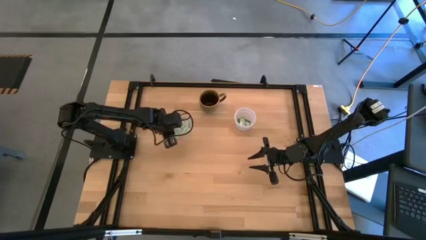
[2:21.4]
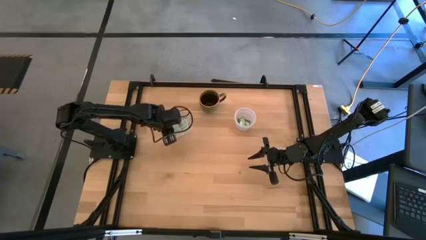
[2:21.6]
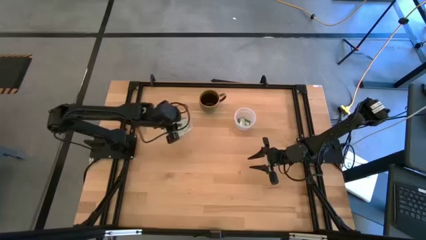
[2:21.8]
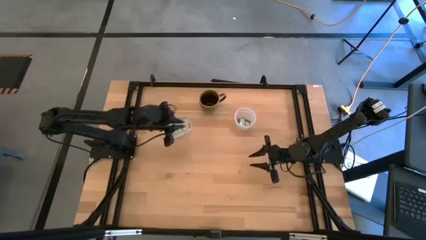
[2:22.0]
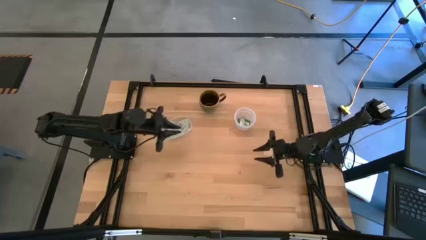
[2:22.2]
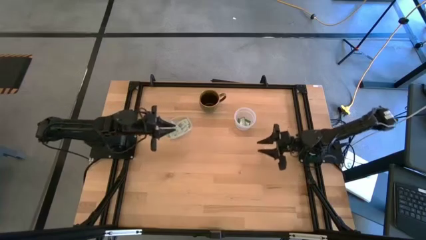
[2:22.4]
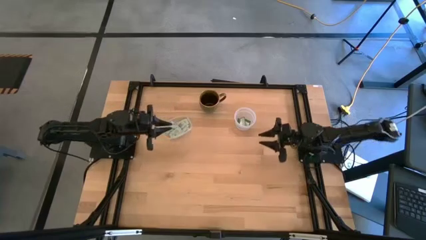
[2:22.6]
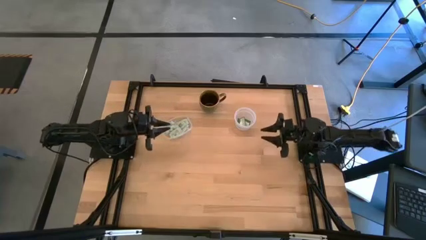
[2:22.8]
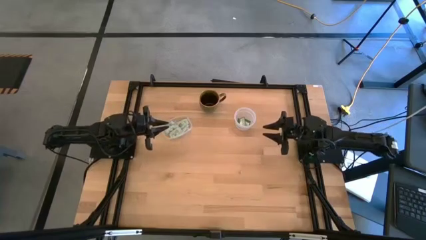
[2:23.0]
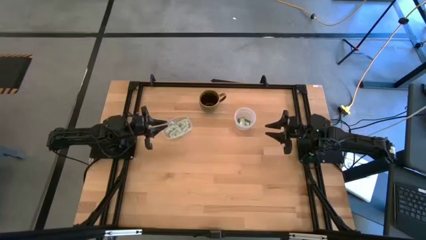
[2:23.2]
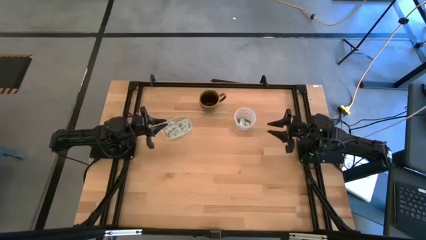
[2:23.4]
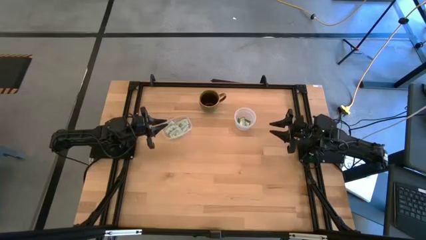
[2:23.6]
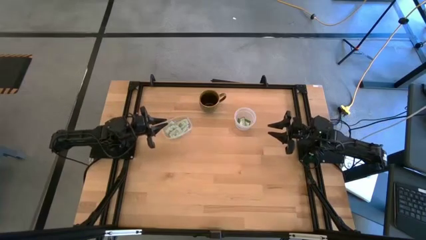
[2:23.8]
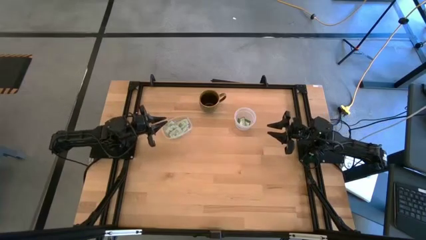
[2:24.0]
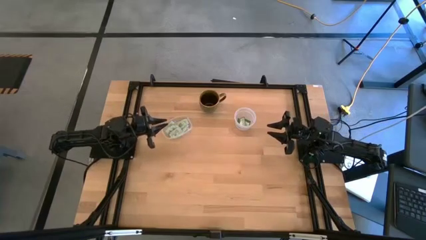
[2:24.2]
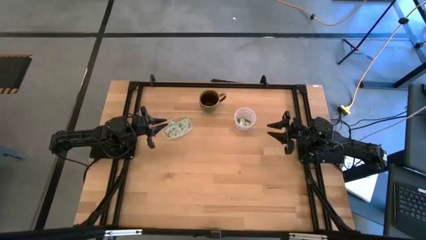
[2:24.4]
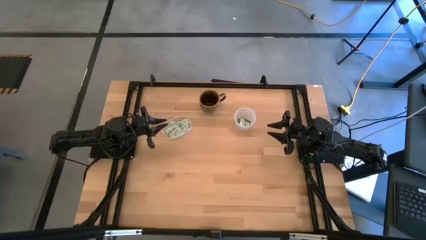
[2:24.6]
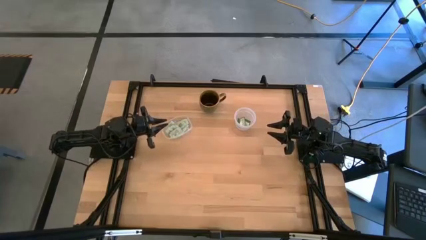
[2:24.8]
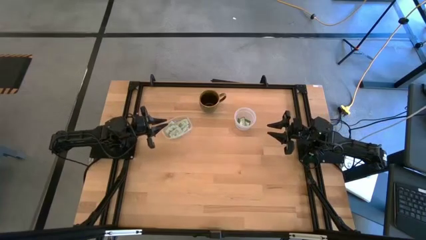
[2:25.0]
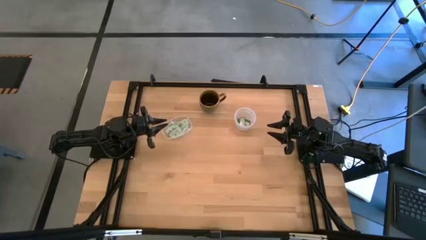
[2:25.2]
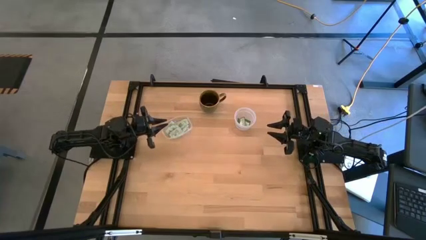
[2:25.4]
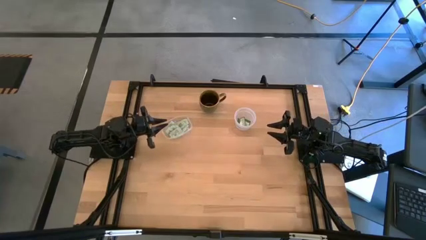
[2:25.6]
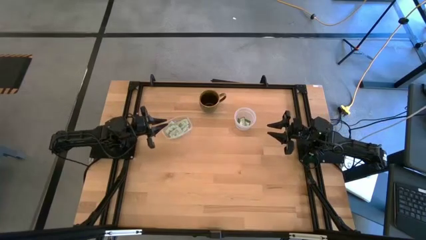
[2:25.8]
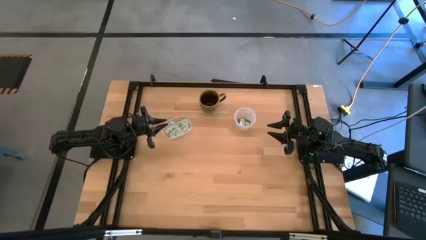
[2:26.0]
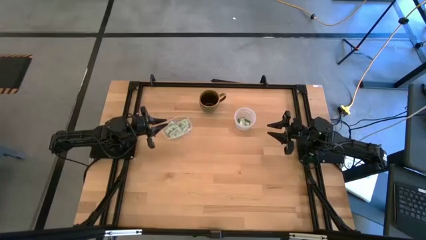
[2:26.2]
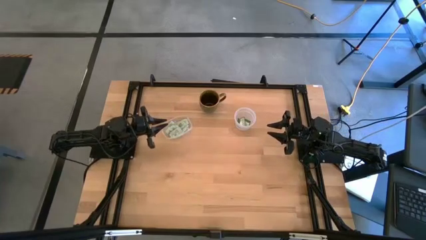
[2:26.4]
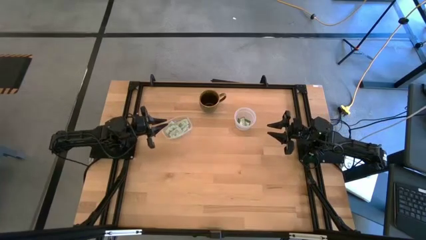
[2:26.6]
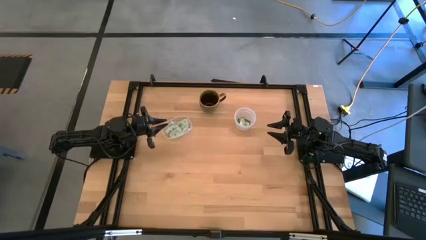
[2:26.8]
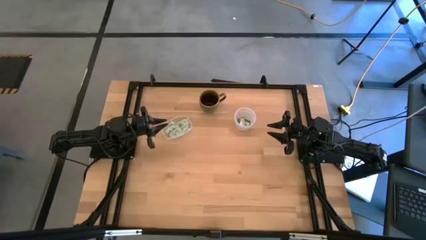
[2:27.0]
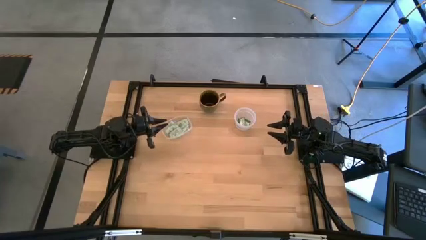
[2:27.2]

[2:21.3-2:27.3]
Task: Pick and place Stevia / Truvia into bins
Return to Home Position

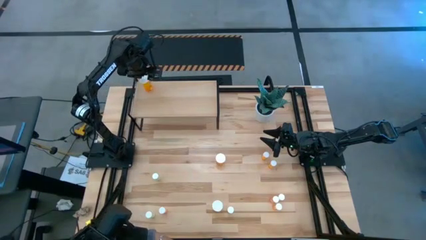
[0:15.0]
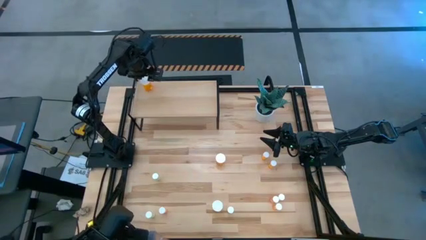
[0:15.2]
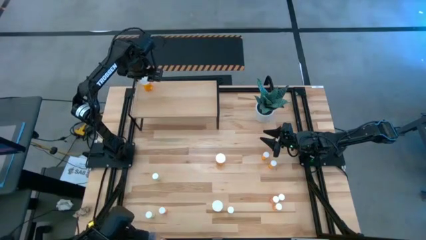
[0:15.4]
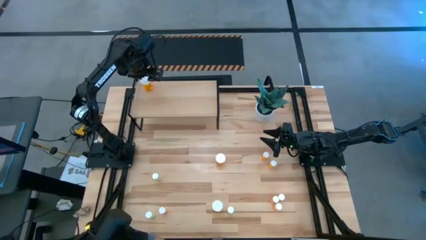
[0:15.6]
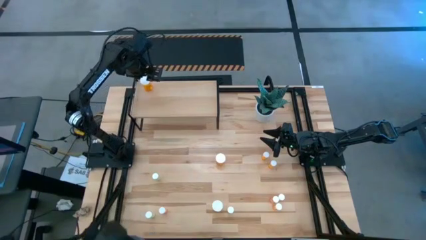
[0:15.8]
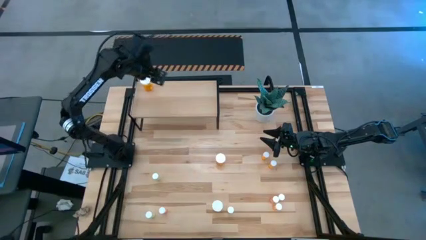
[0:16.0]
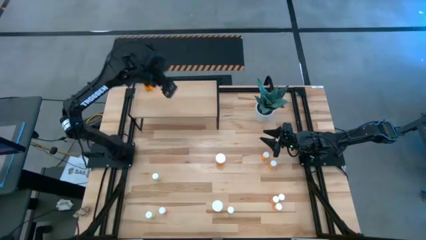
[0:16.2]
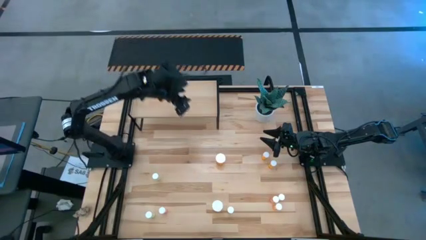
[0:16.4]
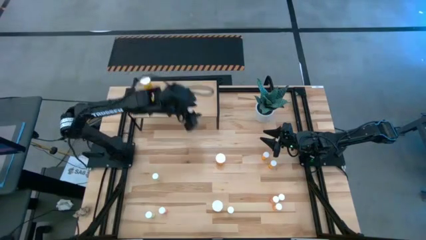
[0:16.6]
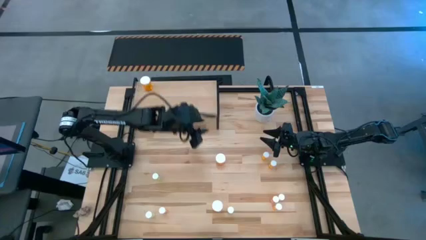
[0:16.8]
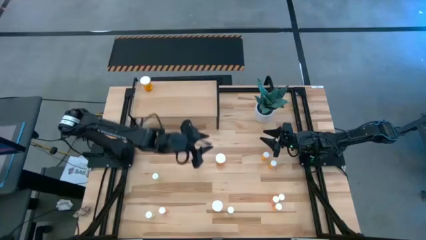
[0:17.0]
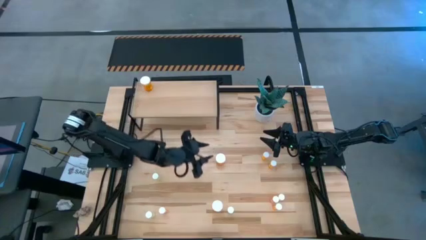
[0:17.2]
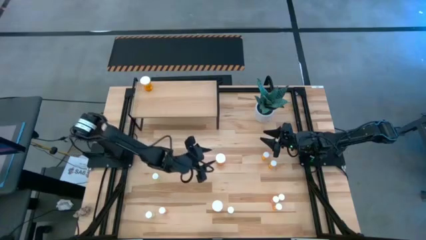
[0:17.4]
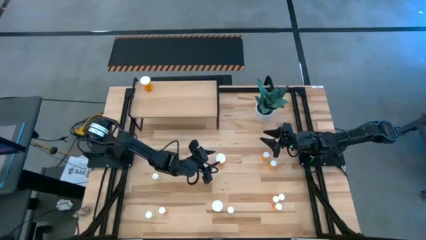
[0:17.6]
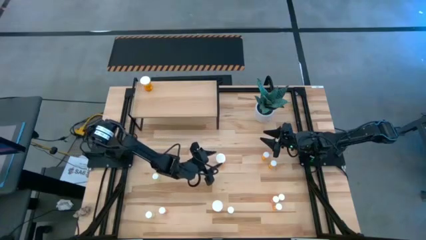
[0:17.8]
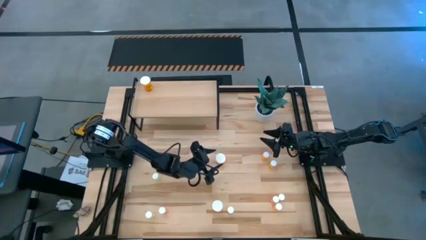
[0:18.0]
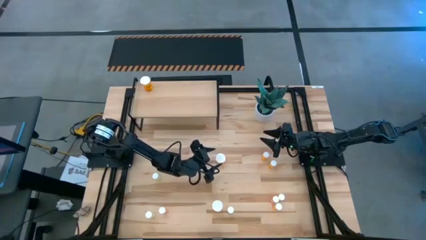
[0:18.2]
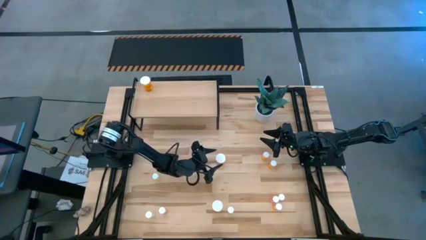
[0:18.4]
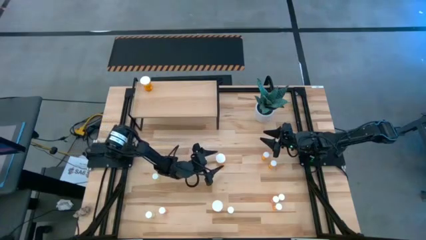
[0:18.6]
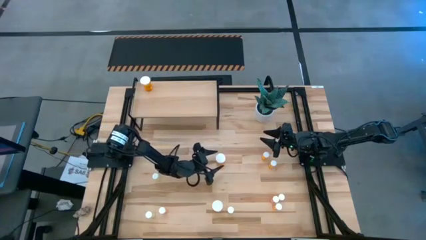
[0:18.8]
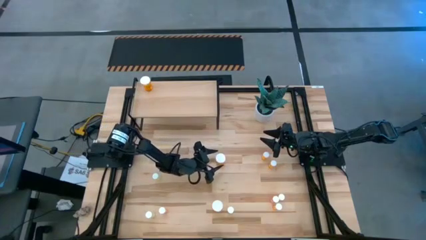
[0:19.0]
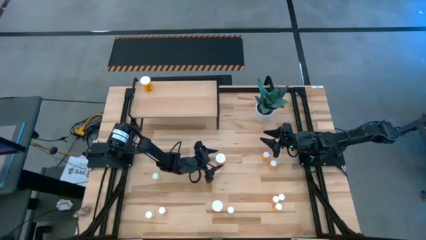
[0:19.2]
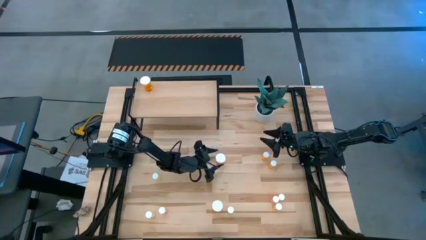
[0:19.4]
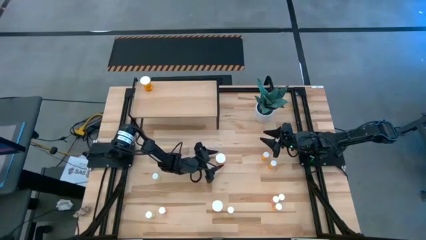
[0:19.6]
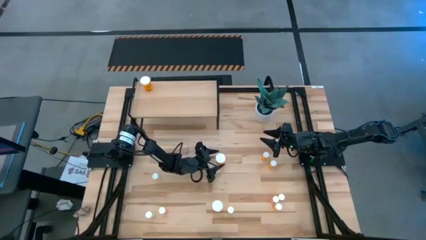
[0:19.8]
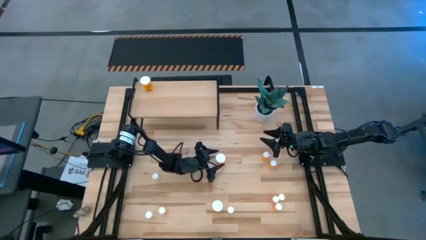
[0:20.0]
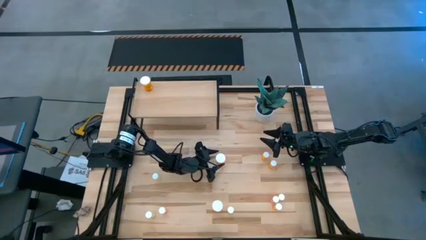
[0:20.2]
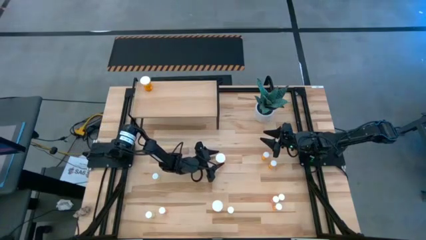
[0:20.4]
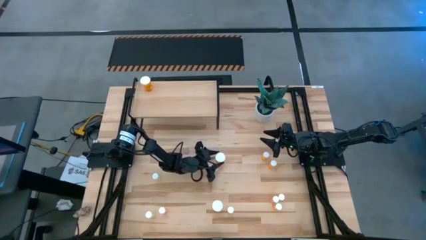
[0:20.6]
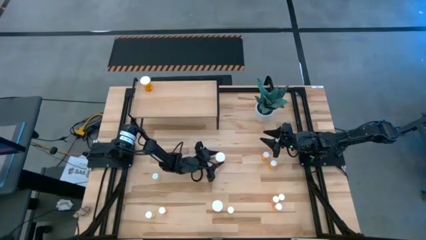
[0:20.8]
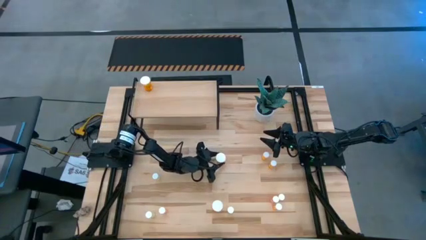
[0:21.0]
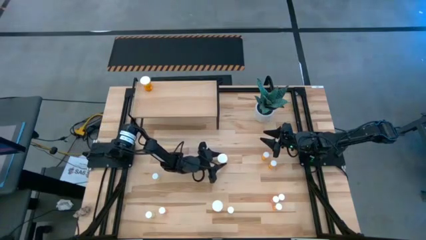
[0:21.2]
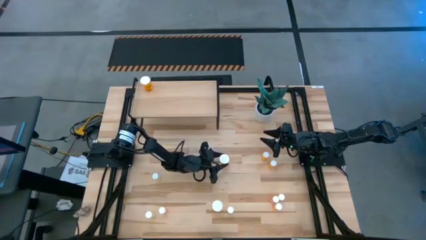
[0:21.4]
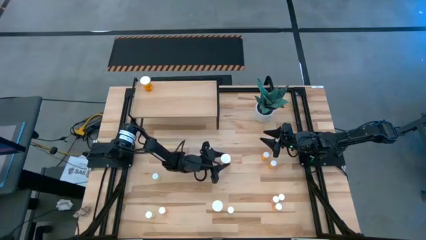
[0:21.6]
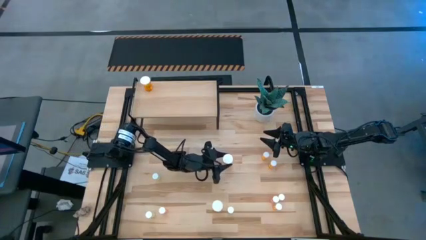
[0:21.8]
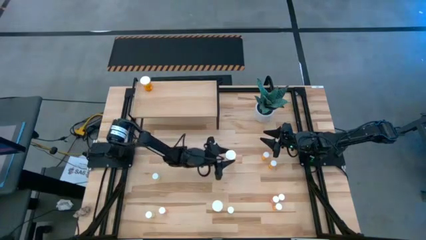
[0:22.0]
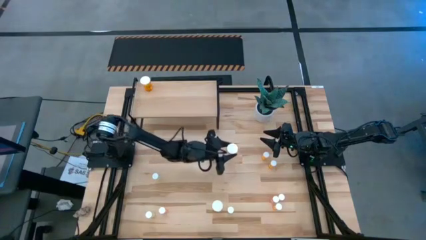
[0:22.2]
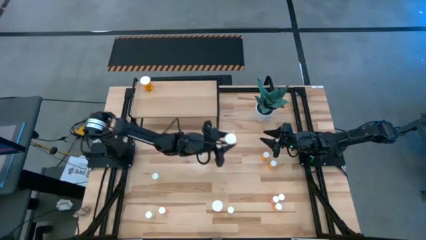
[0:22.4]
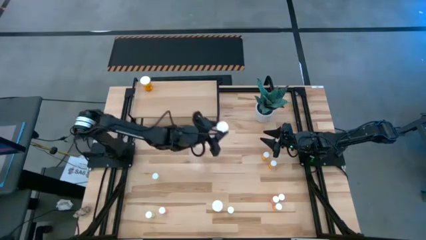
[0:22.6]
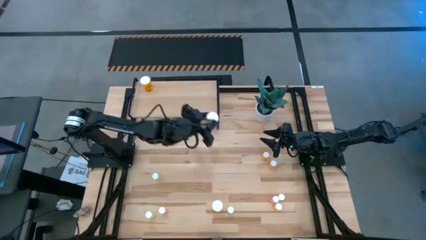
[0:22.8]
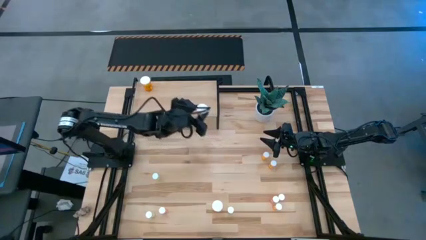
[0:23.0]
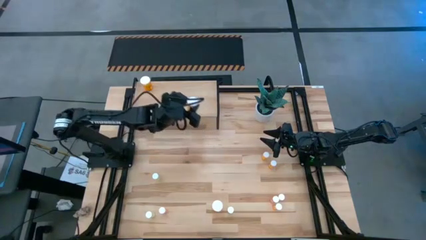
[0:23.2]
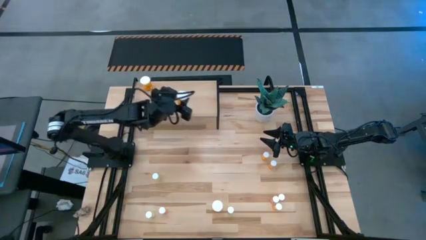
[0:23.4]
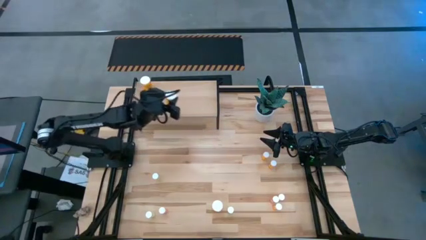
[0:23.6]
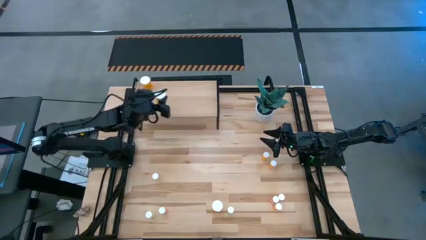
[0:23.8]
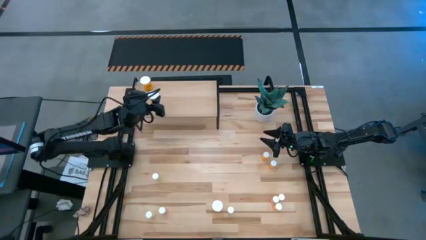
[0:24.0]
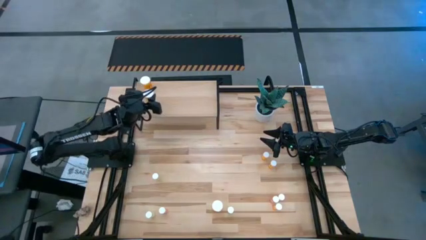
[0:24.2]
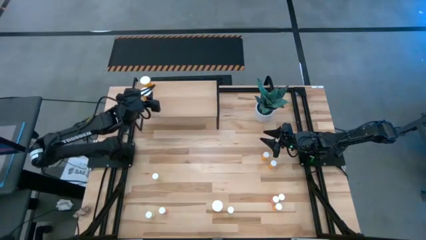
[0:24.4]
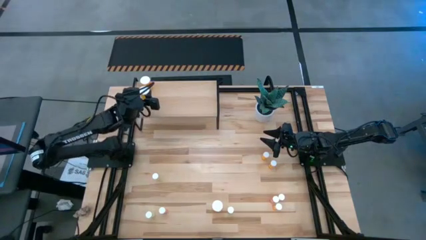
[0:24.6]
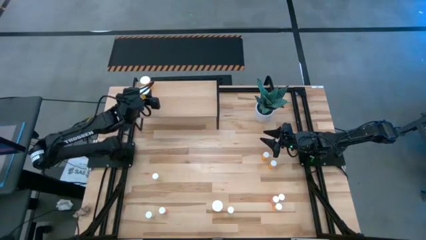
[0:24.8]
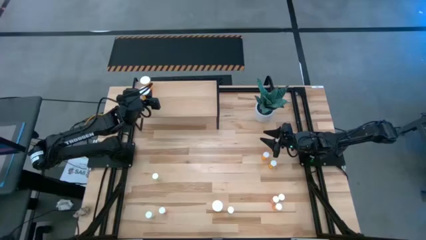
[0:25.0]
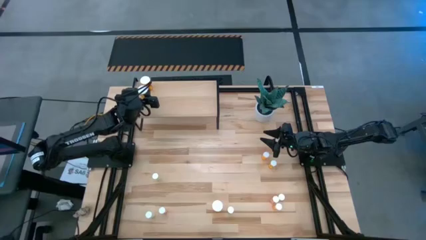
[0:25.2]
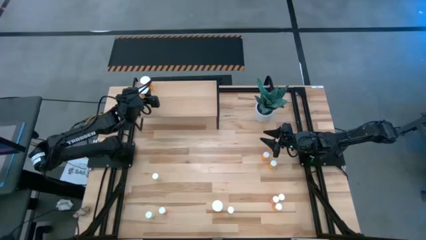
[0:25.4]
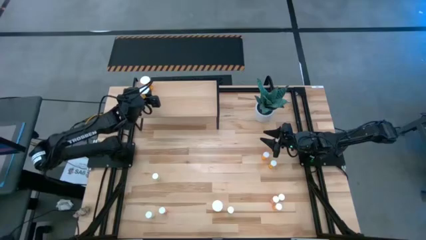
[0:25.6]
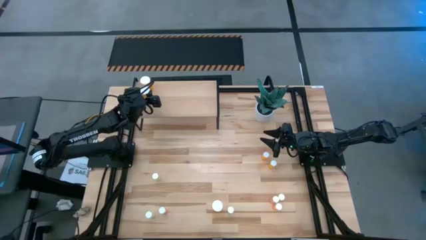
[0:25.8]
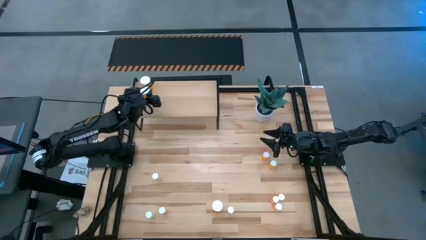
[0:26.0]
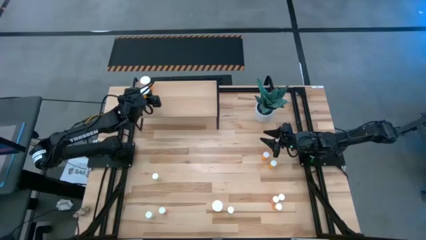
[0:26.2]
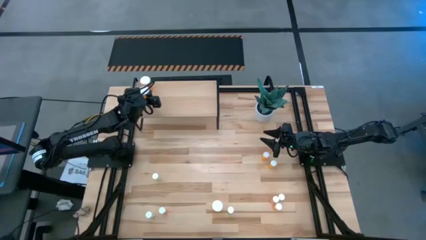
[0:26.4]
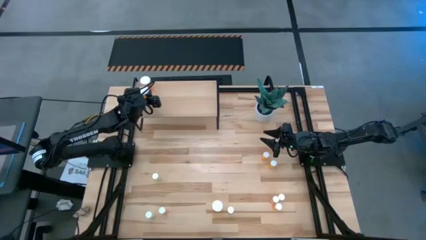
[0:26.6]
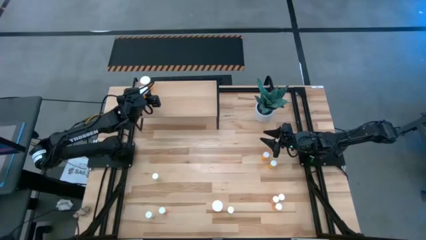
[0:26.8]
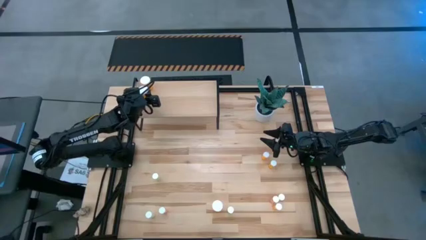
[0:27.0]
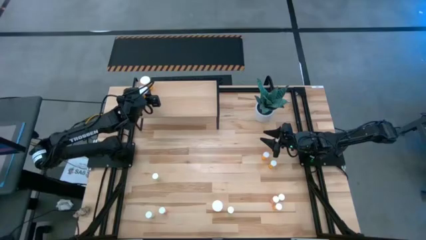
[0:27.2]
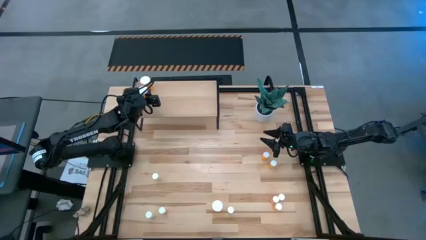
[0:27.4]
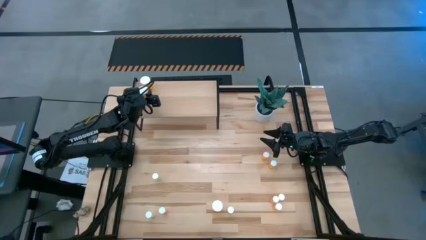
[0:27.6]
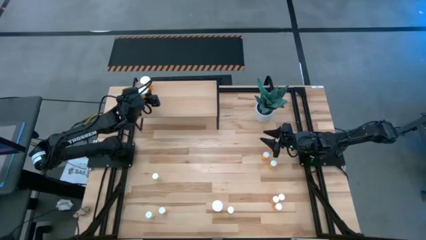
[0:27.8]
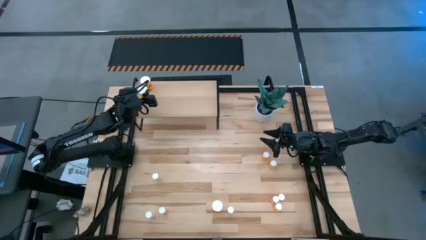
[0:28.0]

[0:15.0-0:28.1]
Task: Pick and place medicine bottles onto shelf by color
Put the top large orange pill bottle on the shelf aligned with the other large orange pill bottle
